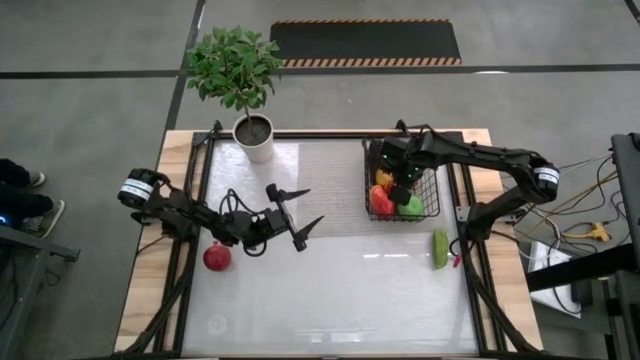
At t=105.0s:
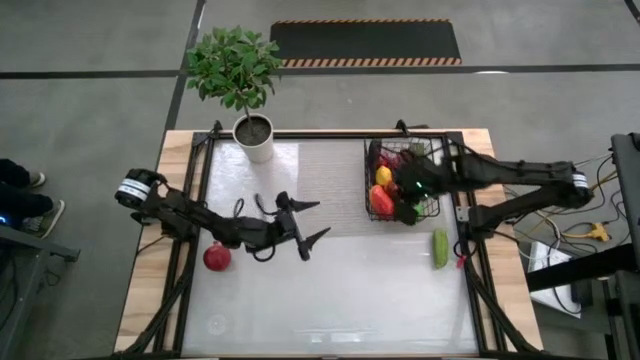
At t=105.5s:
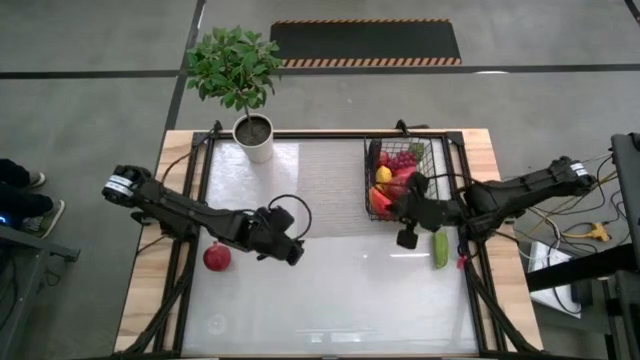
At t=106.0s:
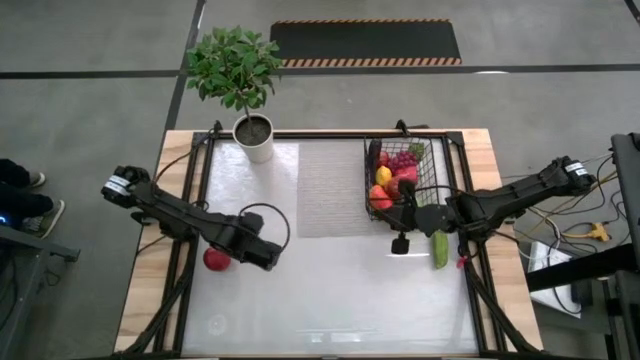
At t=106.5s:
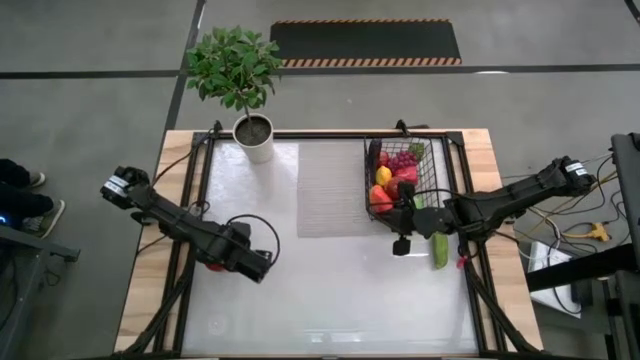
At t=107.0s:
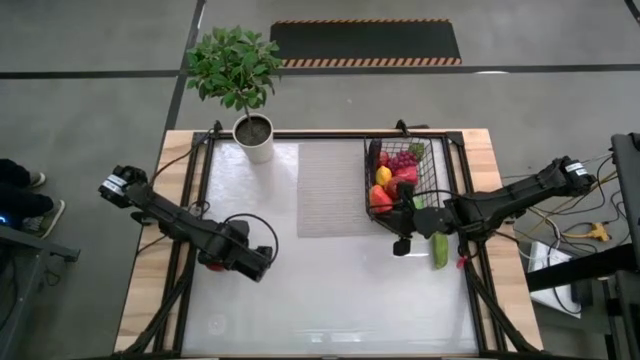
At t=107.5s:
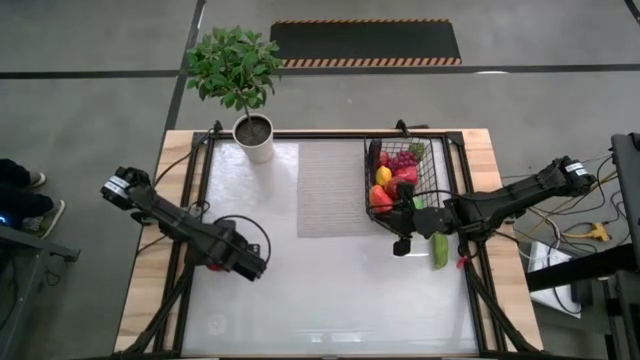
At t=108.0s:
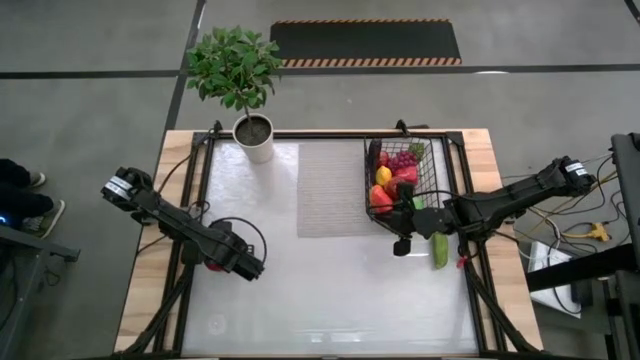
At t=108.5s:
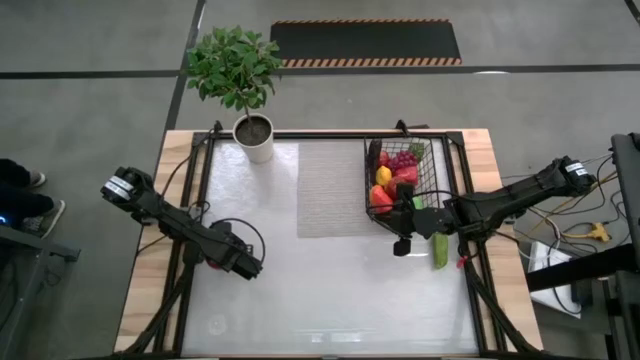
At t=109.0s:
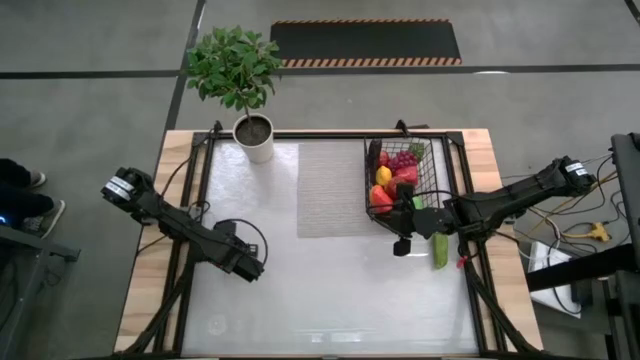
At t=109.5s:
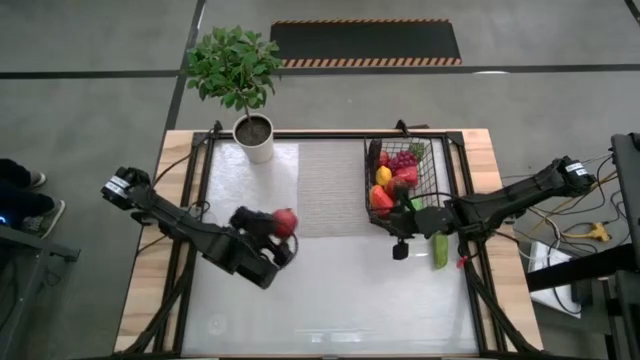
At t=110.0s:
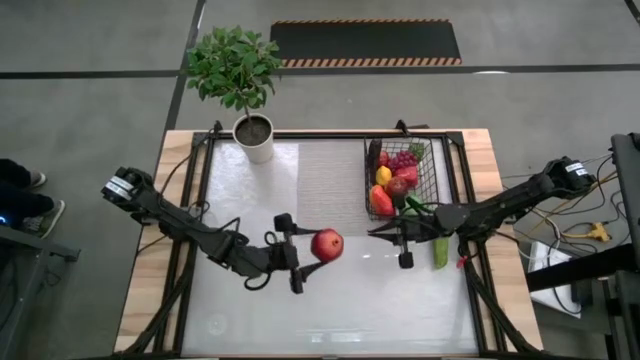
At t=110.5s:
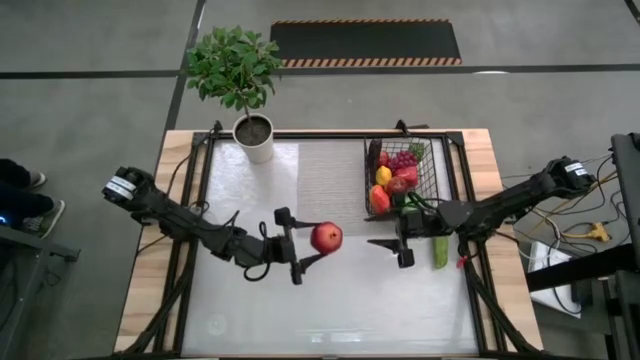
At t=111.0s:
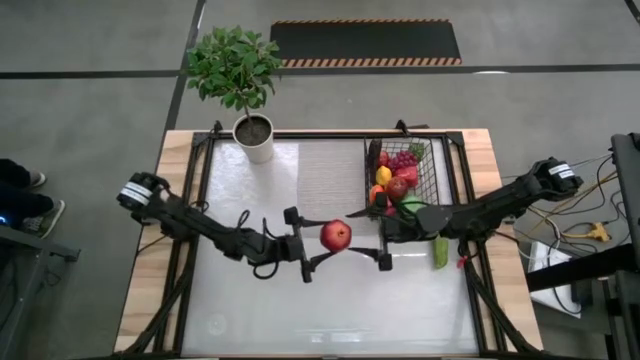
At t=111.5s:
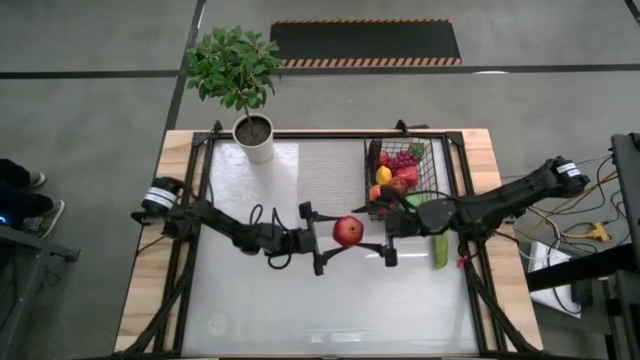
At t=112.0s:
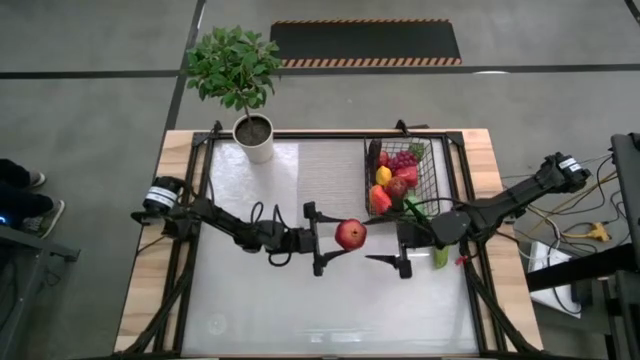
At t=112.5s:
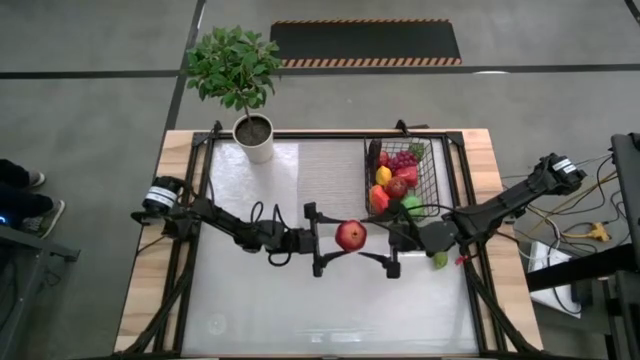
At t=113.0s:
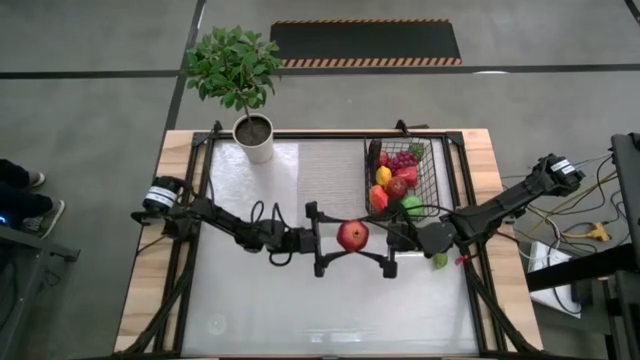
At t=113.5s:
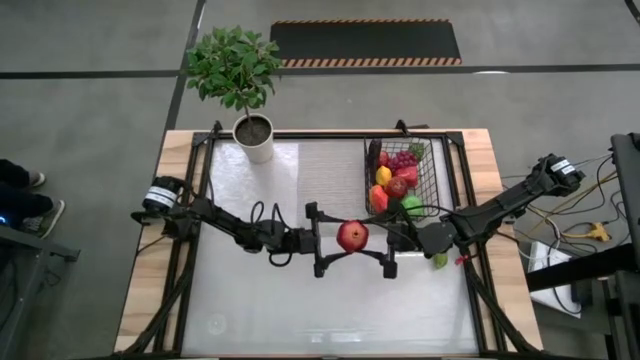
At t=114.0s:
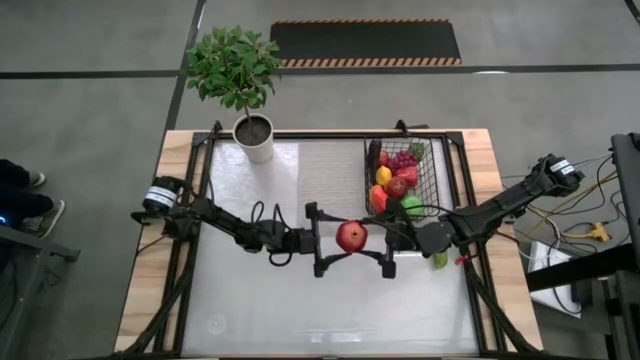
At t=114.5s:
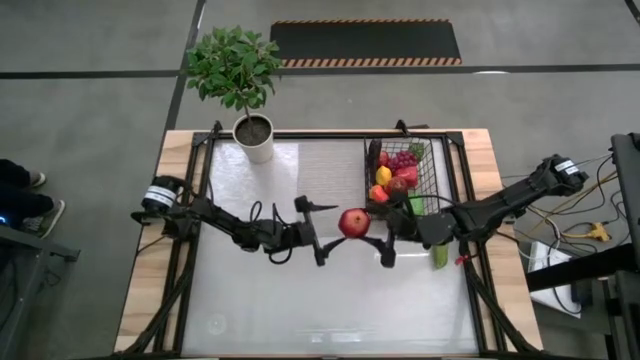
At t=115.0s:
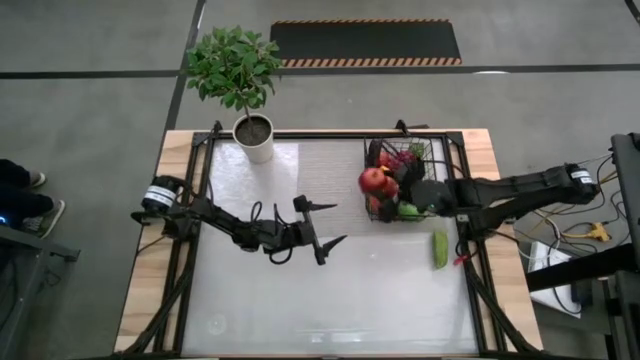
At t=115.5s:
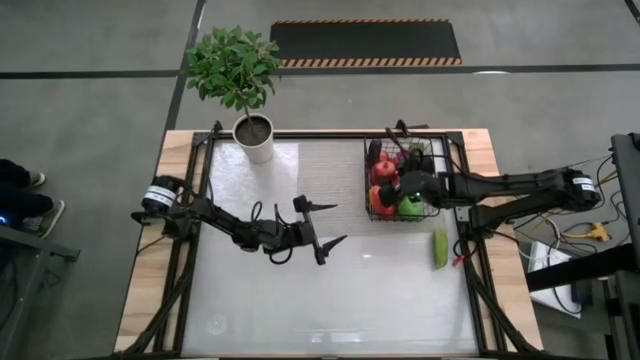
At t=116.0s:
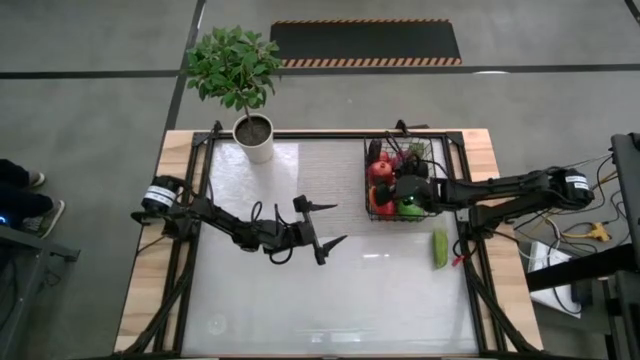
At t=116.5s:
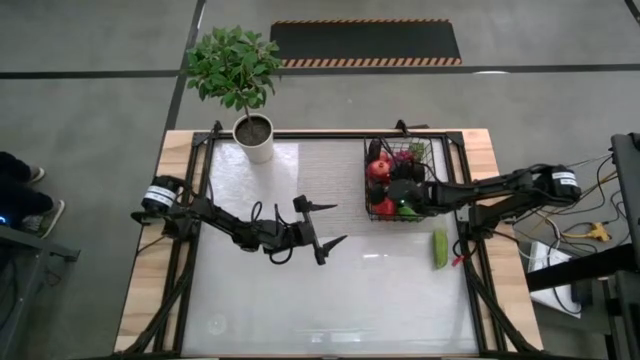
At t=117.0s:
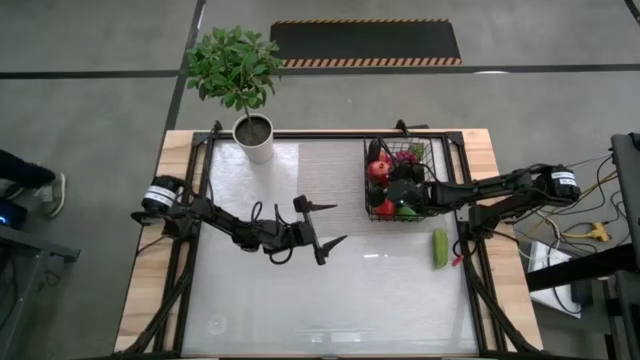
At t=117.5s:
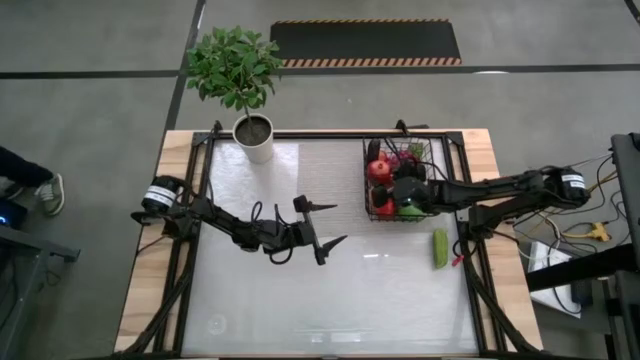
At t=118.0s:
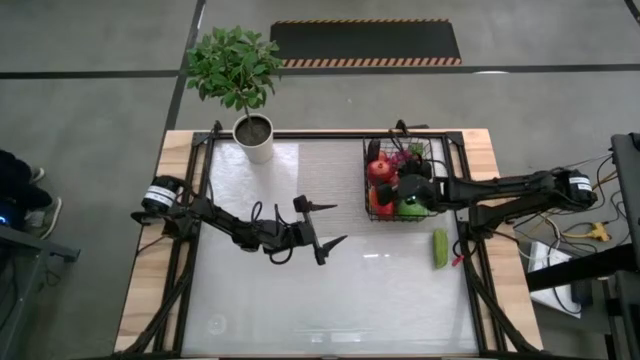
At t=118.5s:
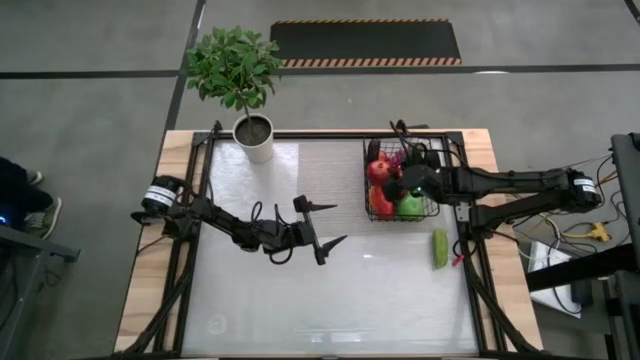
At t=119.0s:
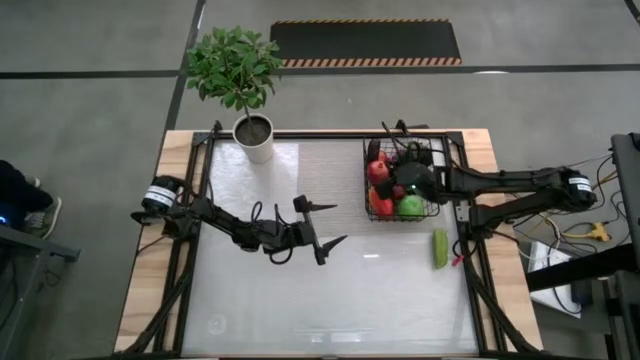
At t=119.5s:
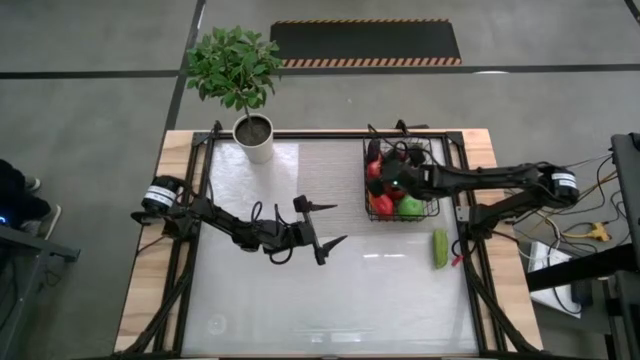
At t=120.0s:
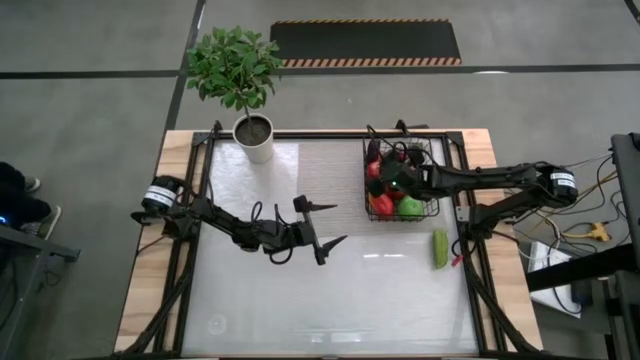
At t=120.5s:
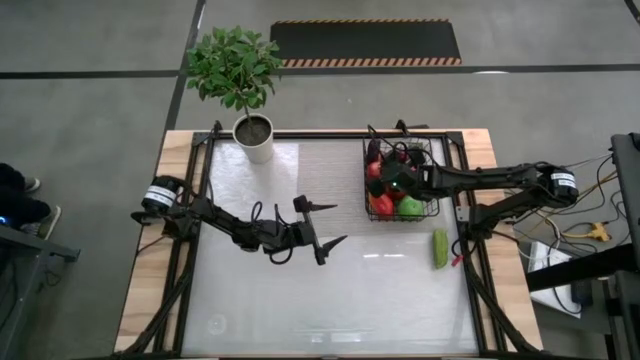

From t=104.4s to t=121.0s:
Task: Build produce basket
Put the red pomegranate into the wire basket

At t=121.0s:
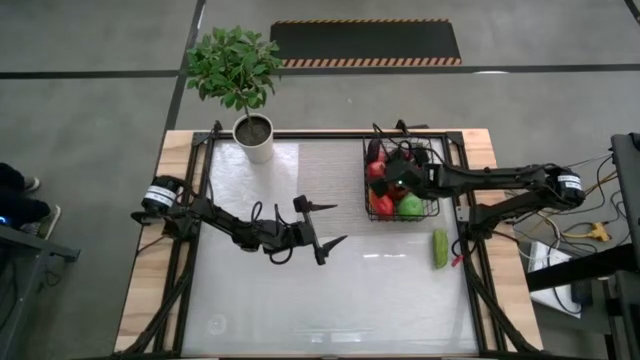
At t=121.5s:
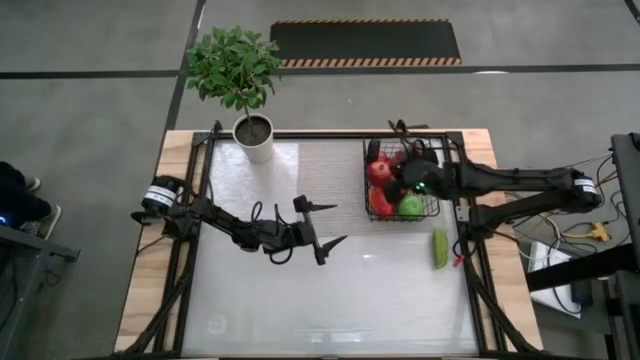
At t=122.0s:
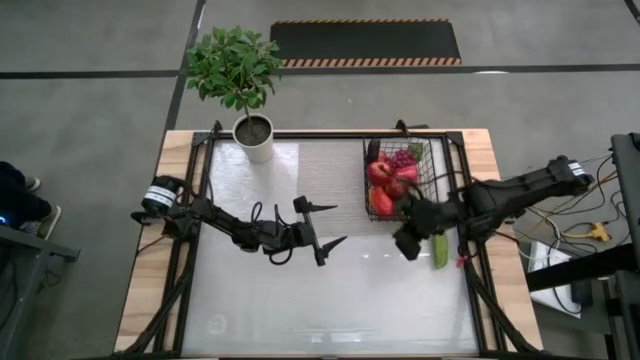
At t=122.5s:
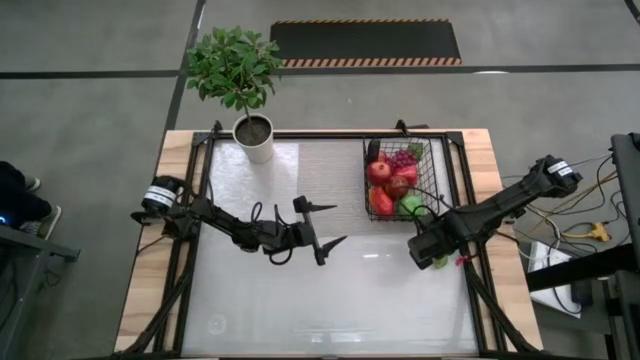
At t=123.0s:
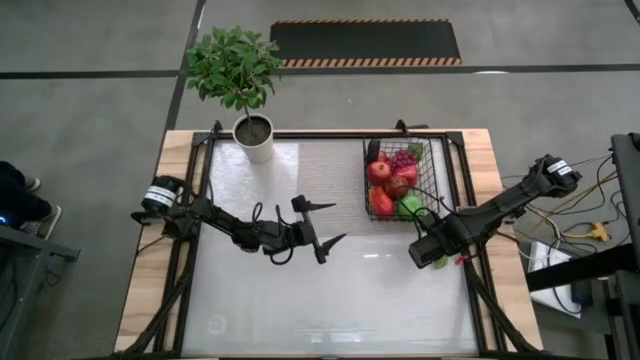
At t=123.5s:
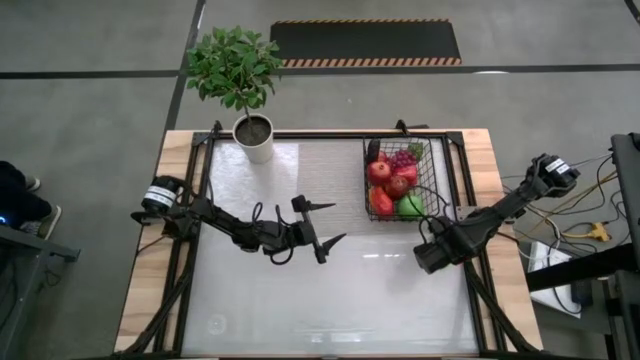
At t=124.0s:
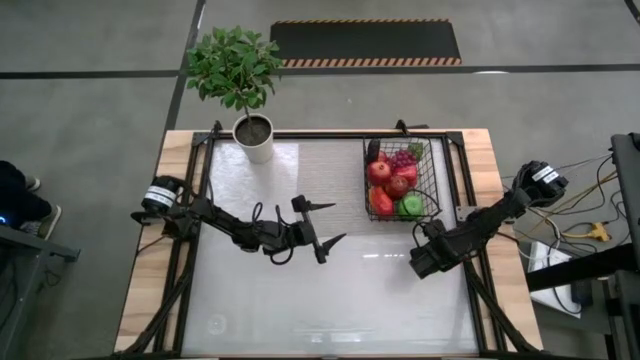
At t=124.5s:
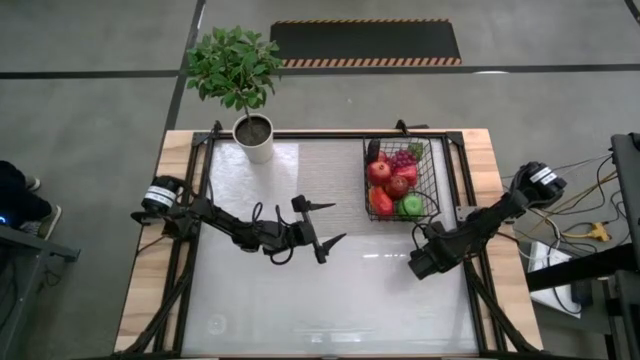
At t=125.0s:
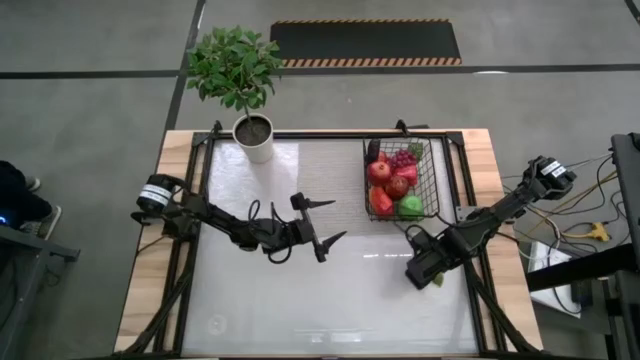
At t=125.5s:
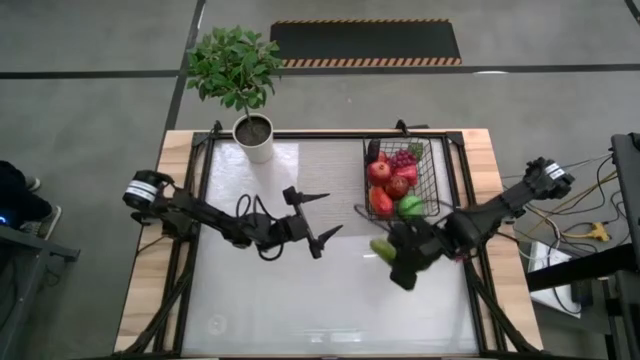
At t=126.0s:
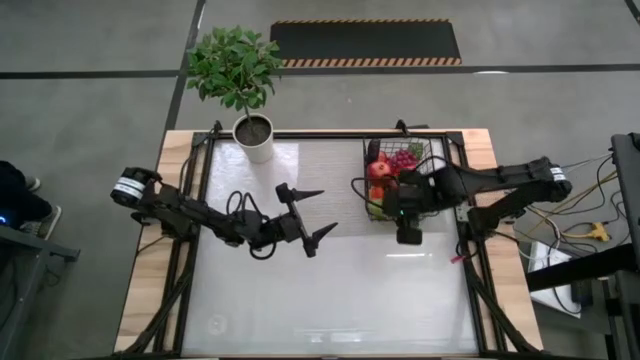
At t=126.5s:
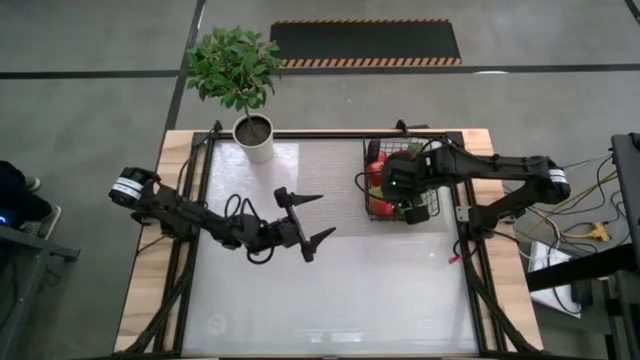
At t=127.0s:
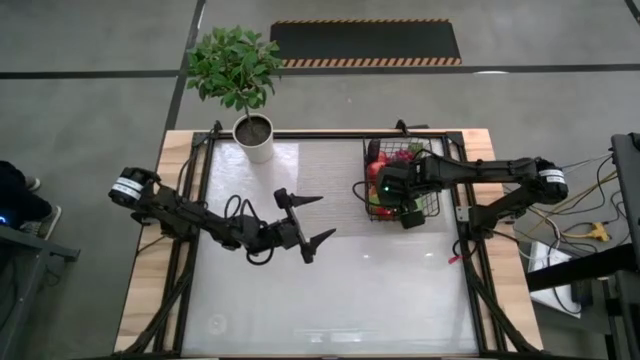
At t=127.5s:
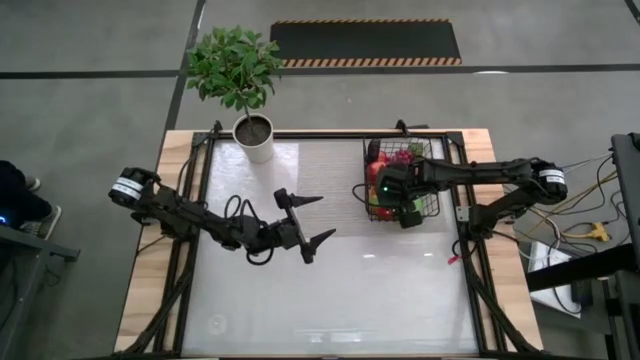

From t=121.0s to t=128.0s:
Put the green cucumber into the wire basket
